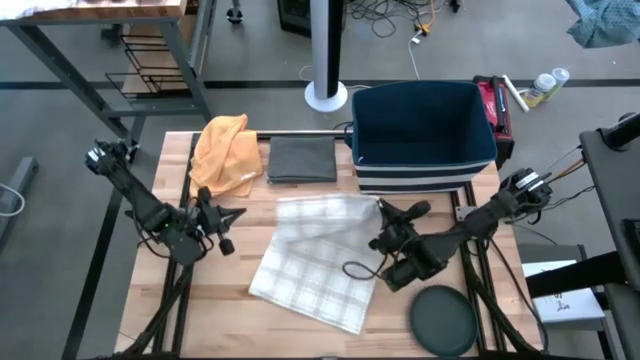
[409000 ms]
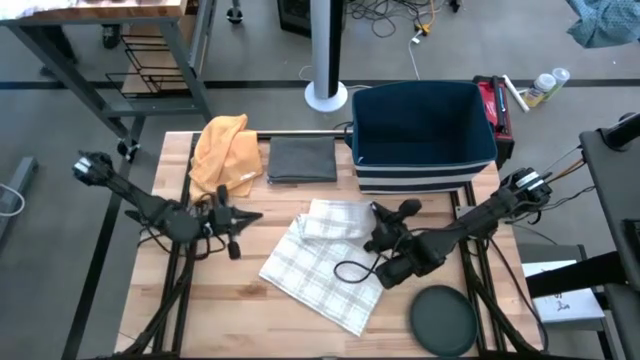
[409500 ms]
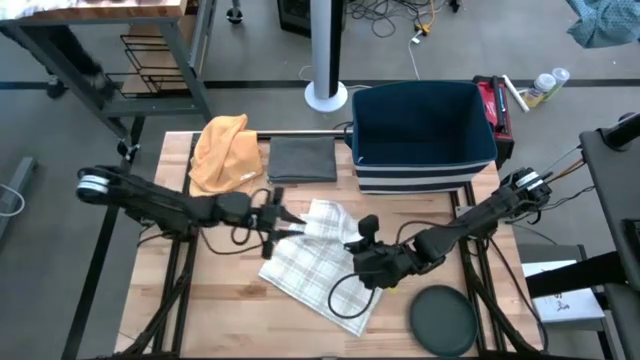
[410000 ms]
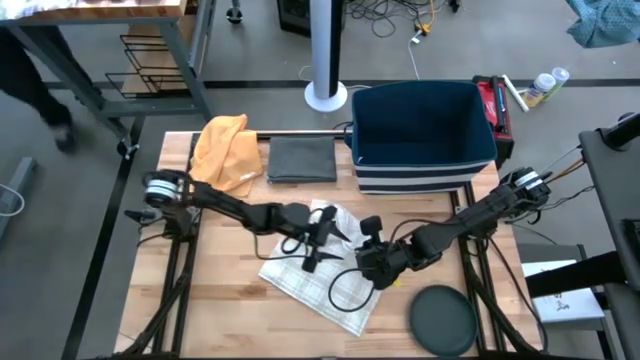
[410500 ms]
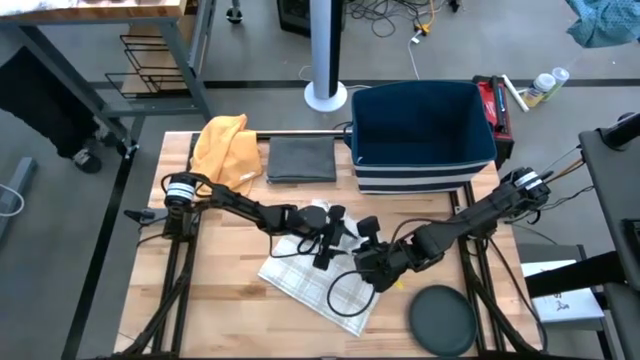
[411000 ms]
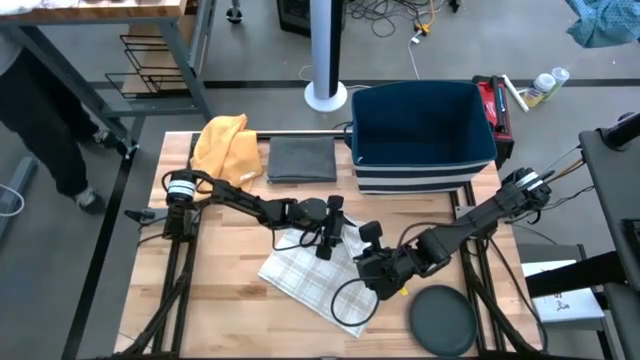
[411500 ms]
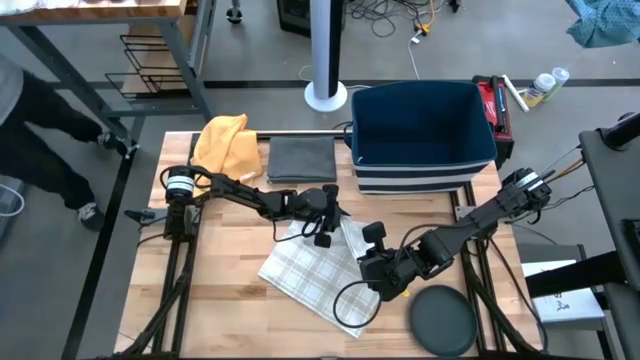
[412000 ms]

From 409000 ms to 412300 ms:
Task: Fold kitchen towel into neat rectangle
Fold the white patterned towel

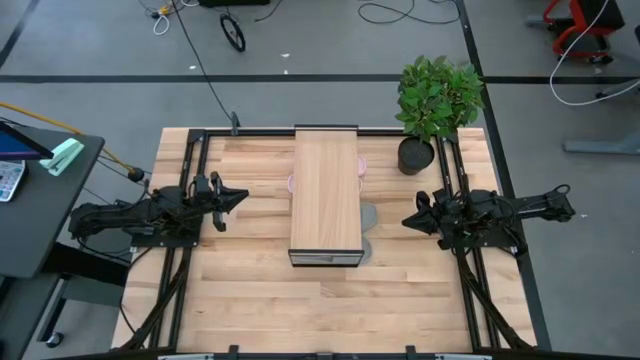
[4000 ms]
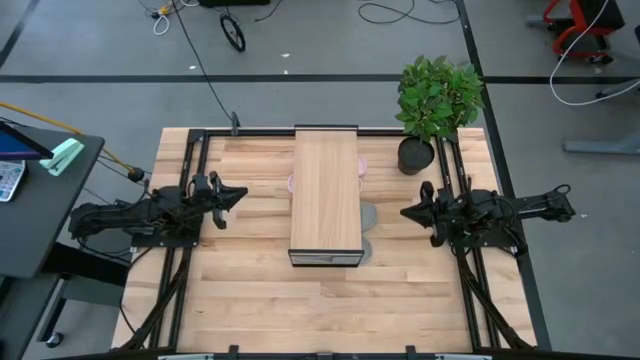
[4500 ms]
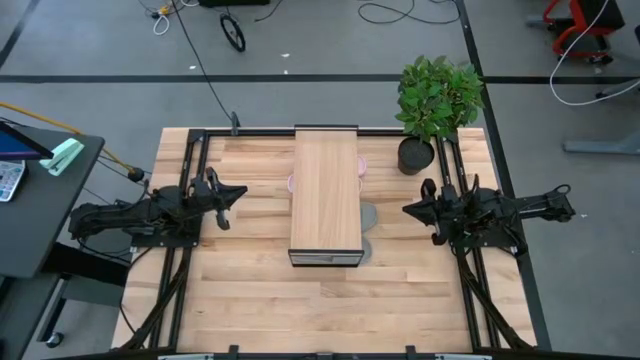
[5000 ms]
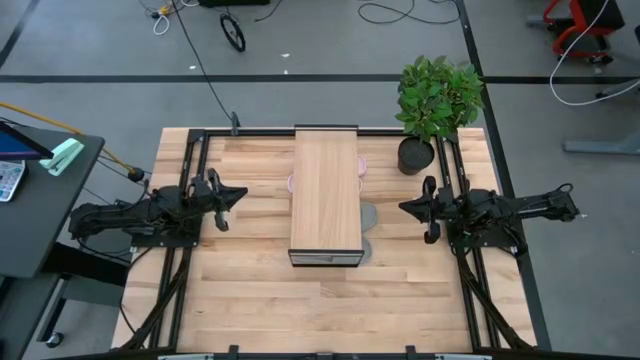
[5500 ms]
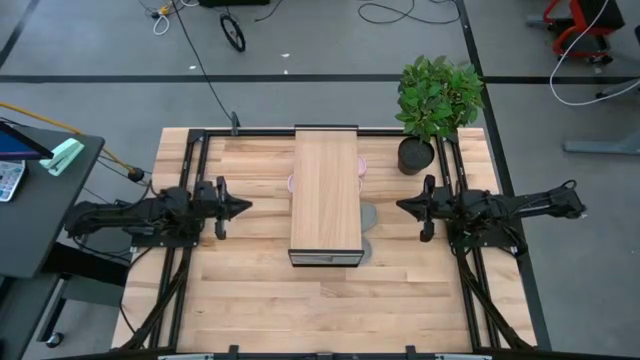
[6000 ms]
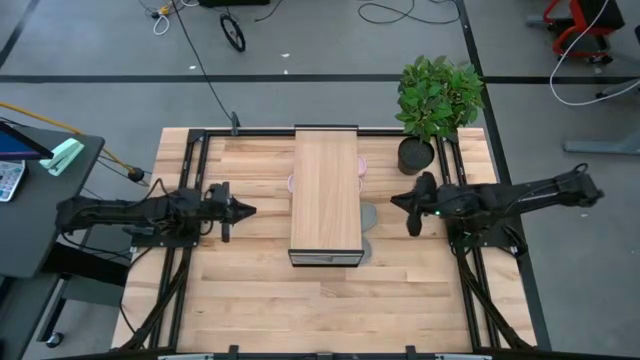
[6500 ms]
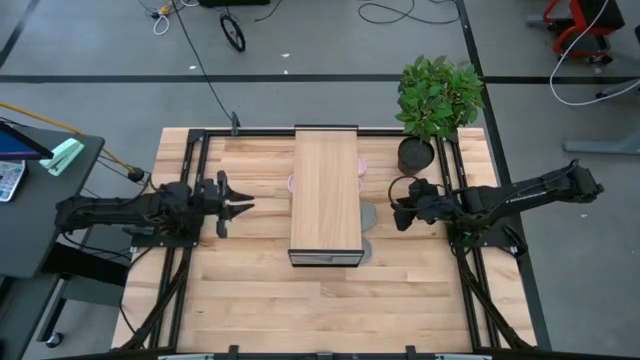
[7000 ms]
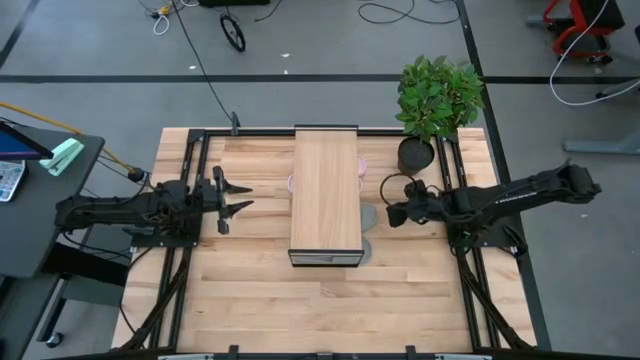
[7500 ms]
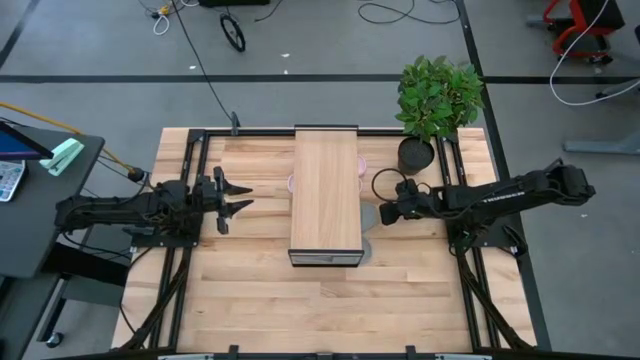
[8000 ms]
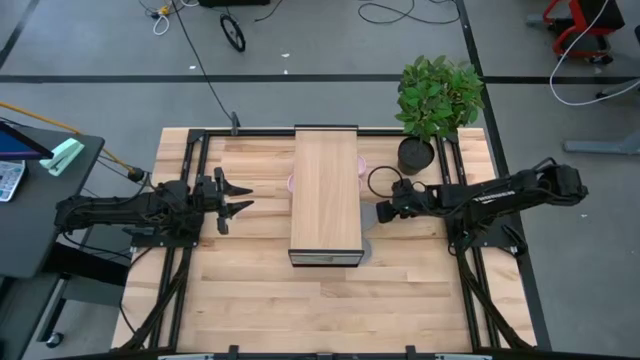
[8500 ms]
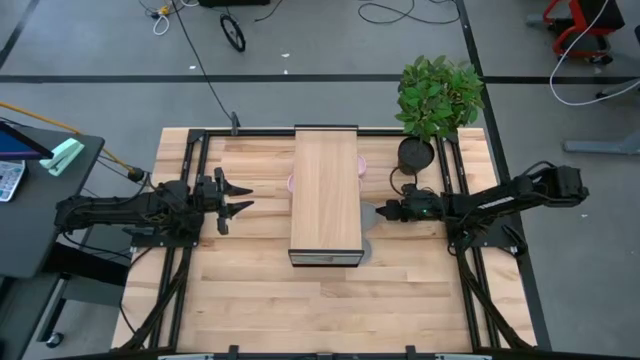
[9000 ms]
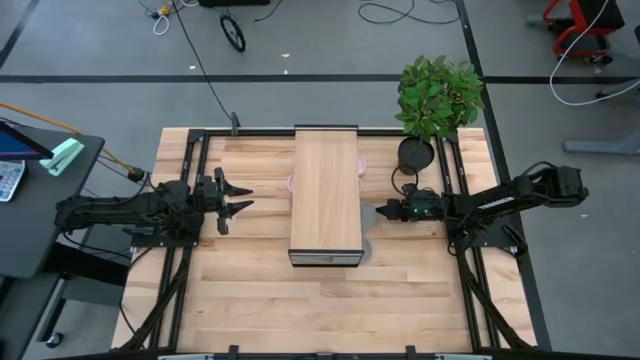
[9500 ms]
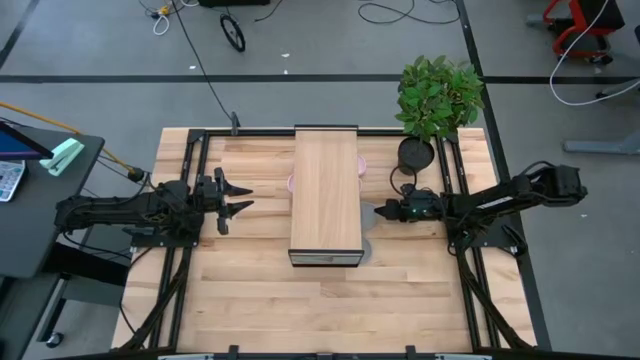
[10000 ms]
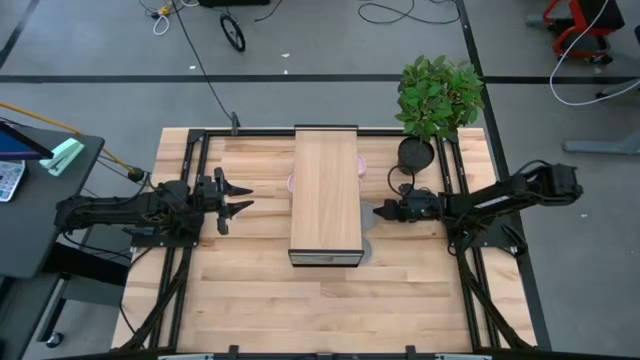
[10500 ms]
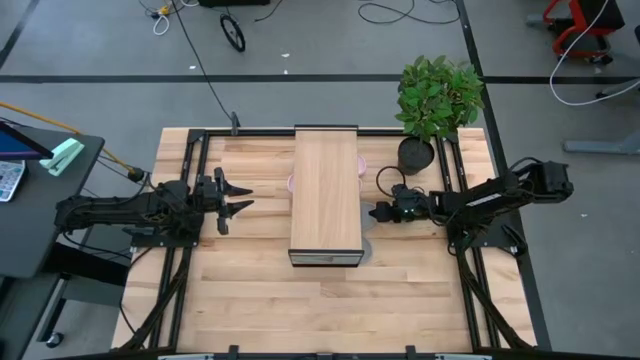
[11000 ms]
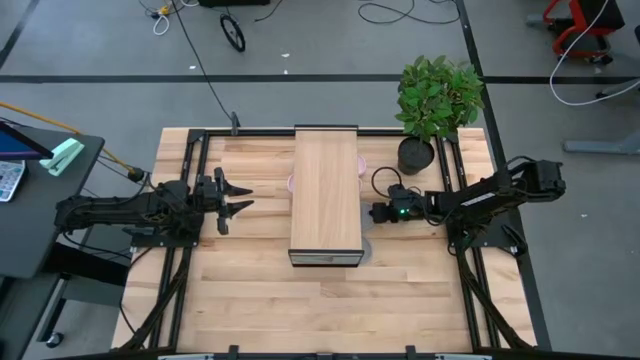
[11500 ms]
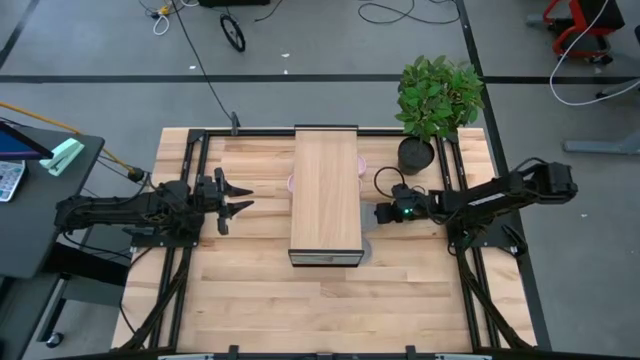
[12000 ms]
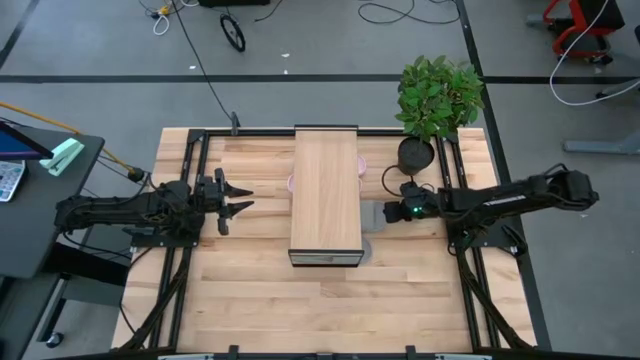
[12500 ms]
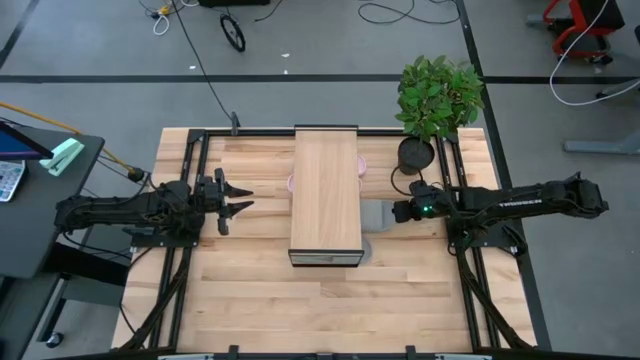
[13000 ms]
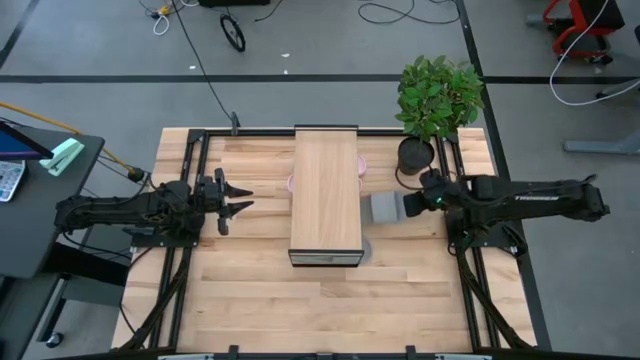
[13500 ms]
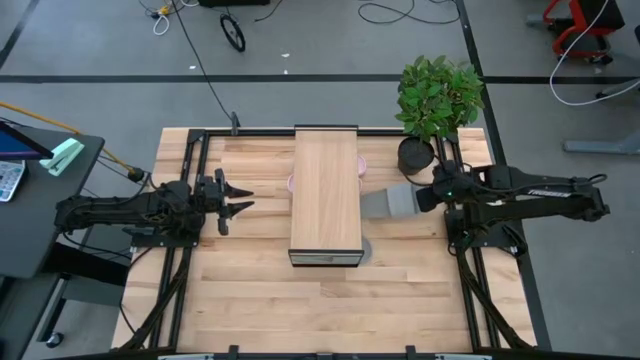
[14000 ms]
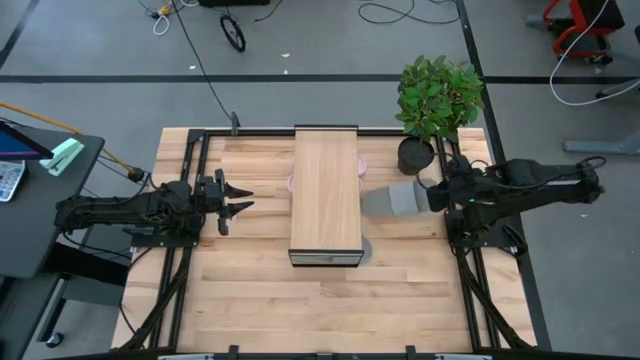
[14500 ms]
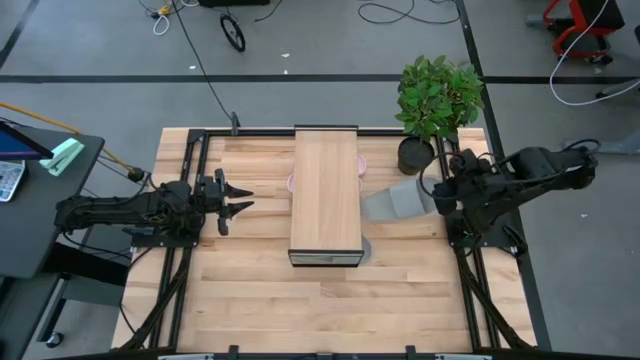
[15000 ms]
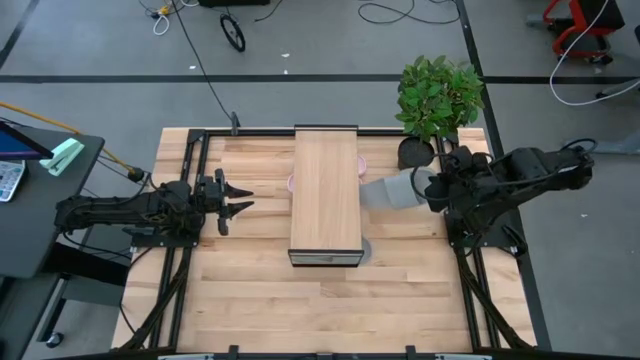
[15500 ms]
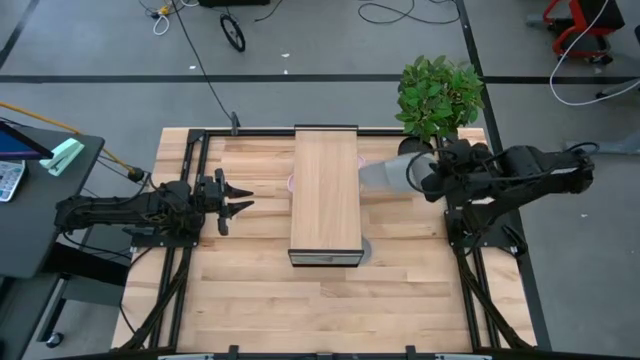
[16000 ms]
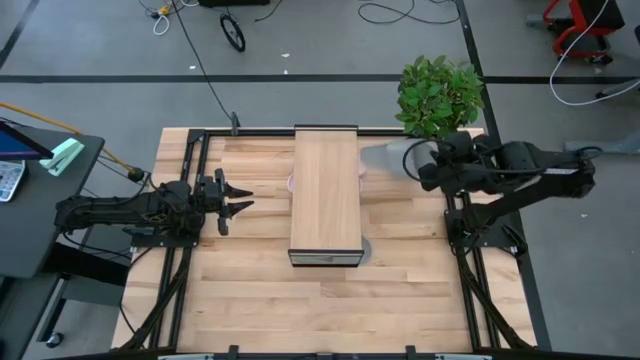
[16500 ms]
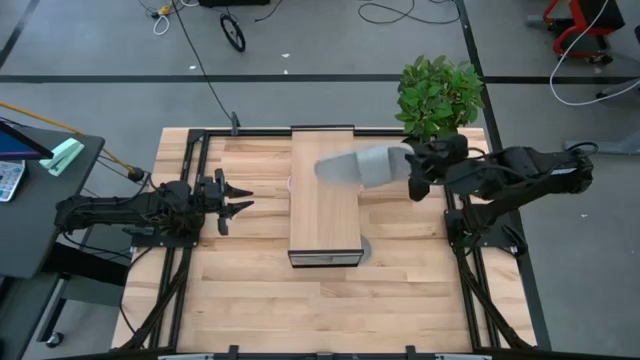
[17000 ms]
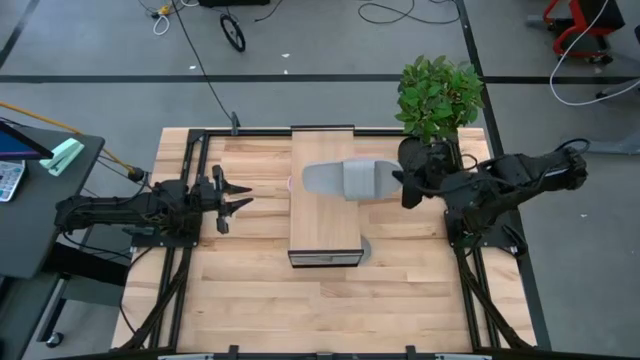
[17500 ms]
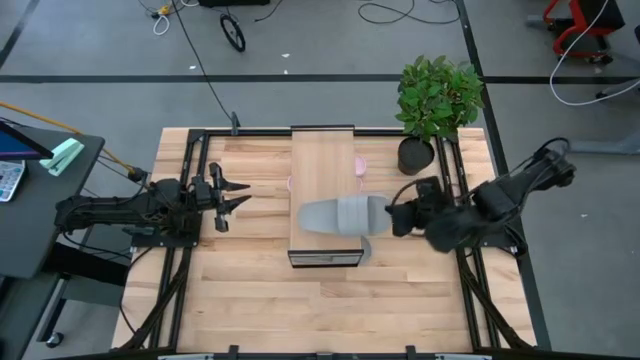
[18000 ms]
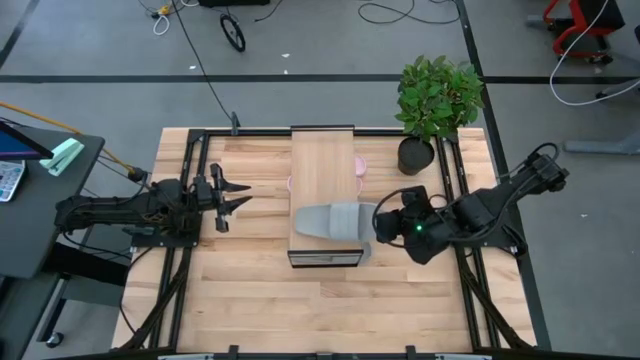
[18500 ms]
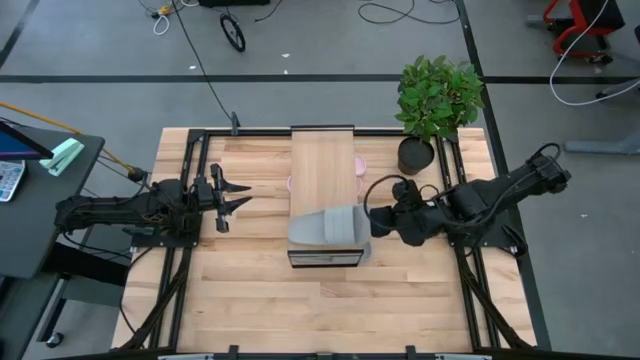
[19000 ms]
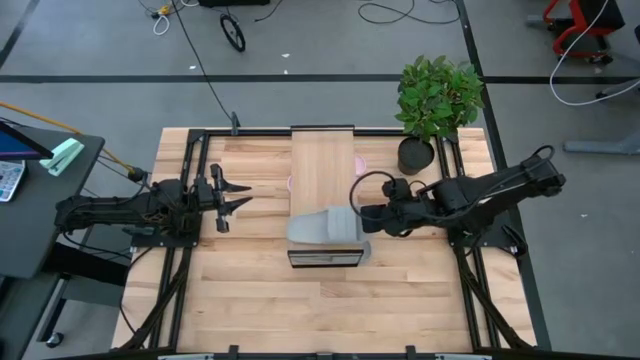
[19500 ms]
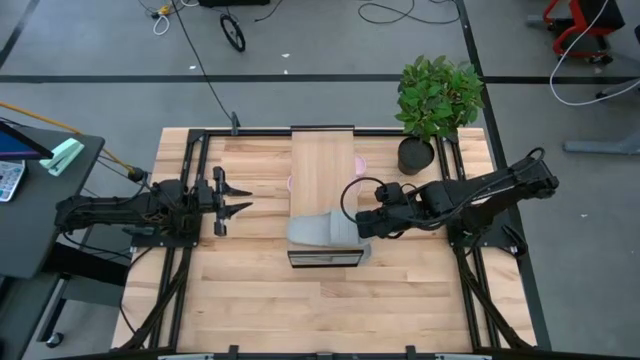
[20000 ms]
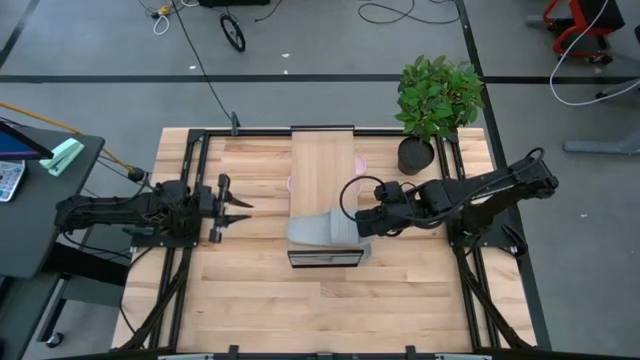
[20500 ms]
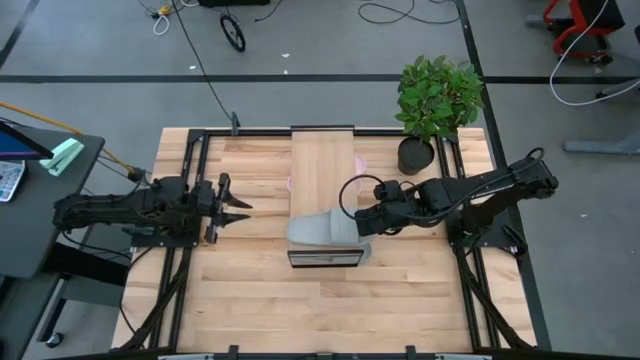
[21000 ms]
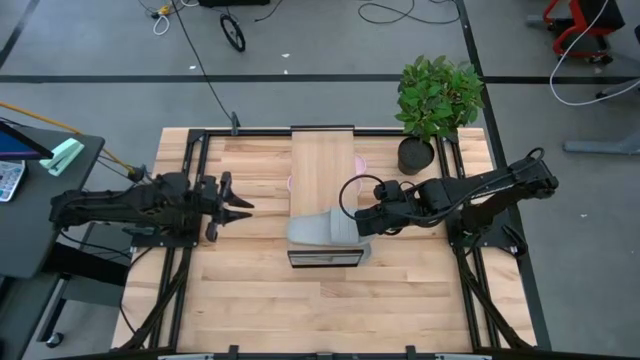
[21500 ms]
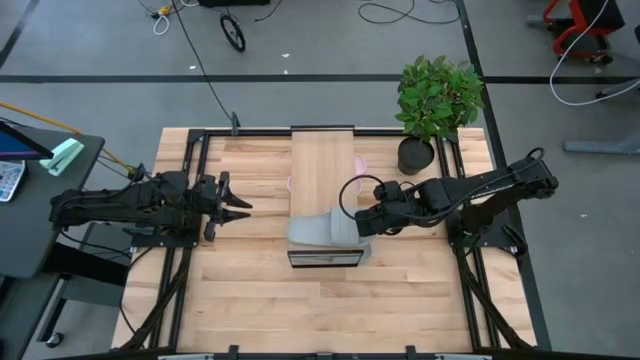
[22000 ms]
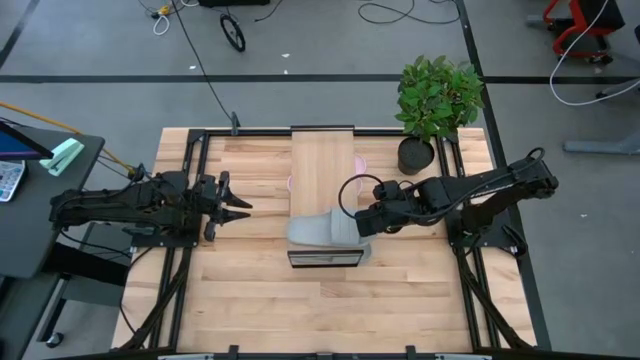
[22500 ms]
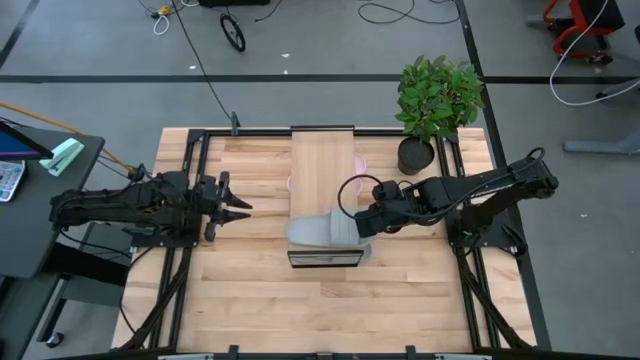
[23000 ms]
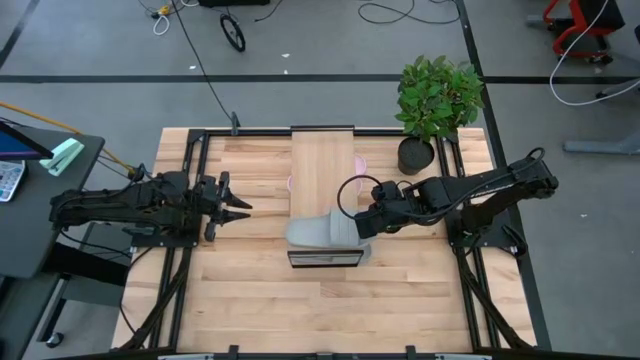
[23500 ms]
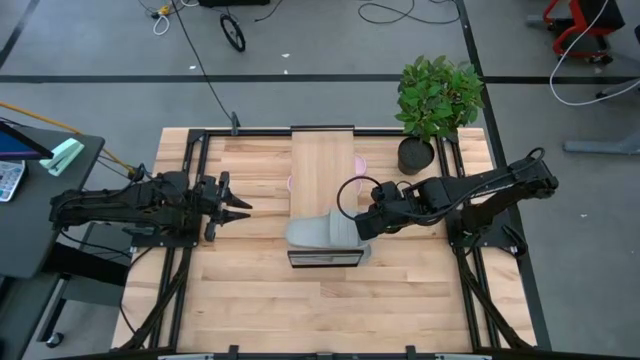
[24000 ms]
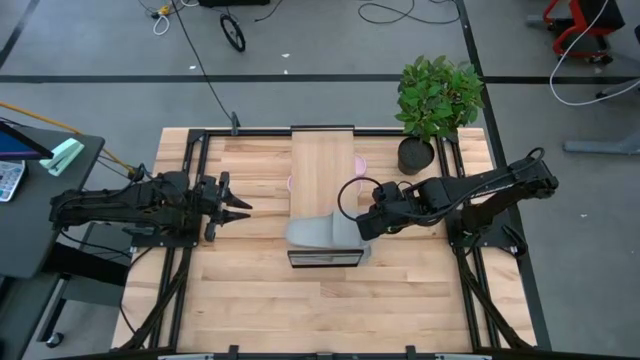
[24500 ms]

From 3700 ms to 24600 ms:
Task: Pick and place slides into the shelf
Put the top gray slipper on the shelf
